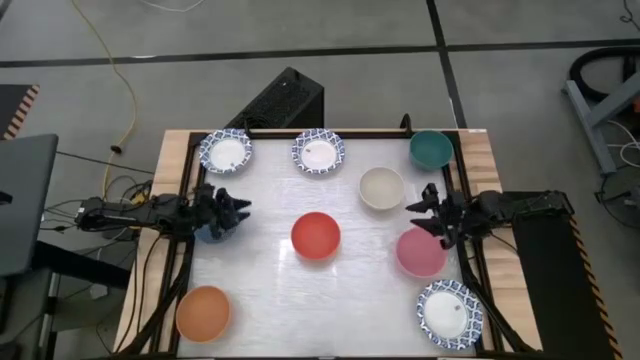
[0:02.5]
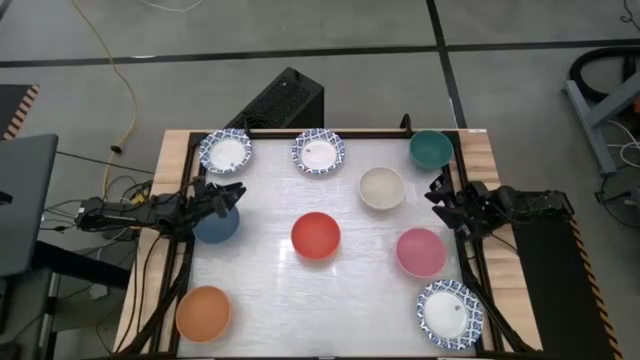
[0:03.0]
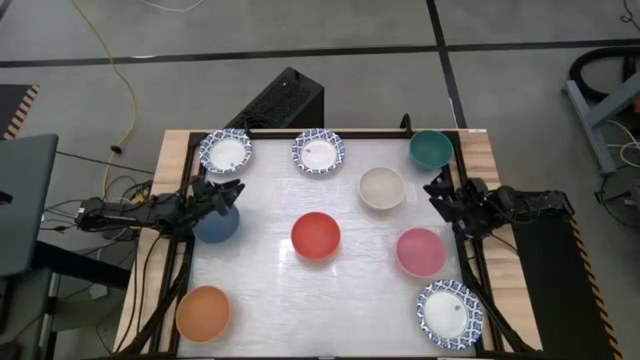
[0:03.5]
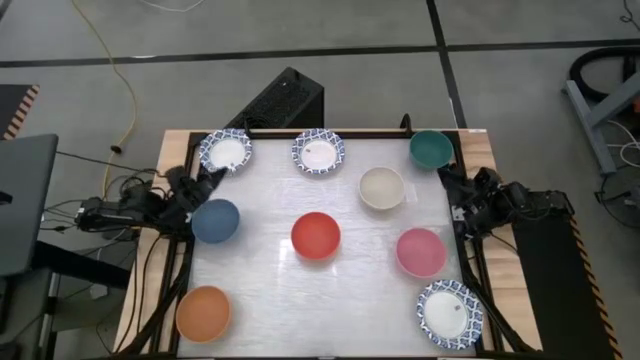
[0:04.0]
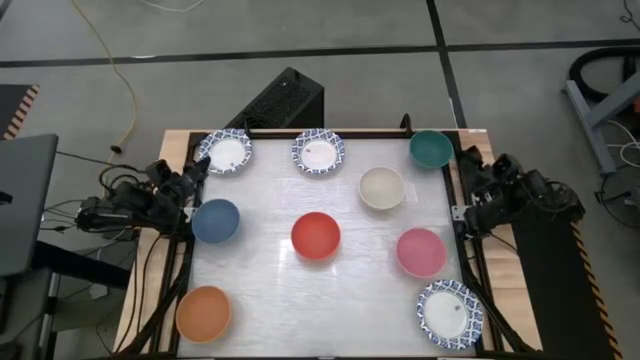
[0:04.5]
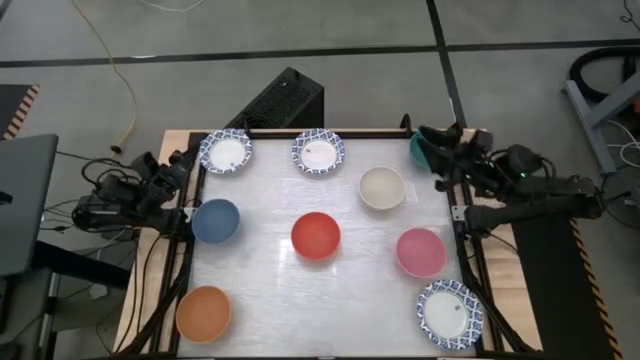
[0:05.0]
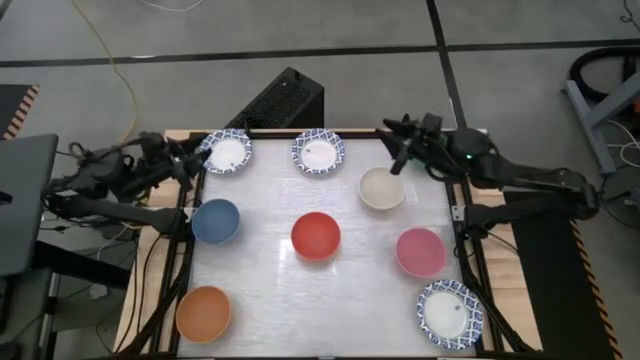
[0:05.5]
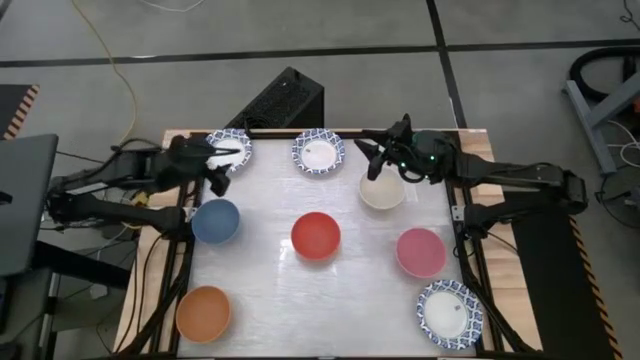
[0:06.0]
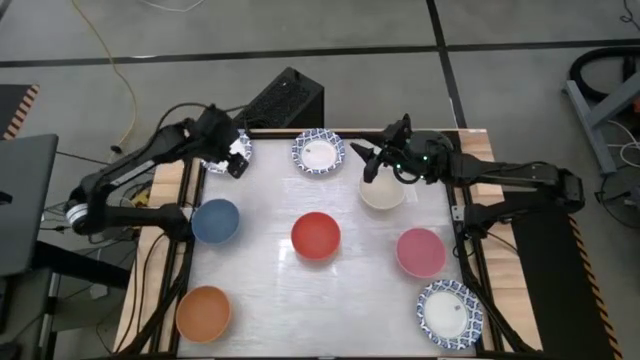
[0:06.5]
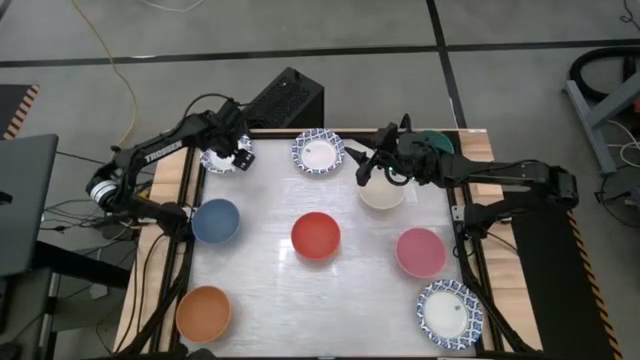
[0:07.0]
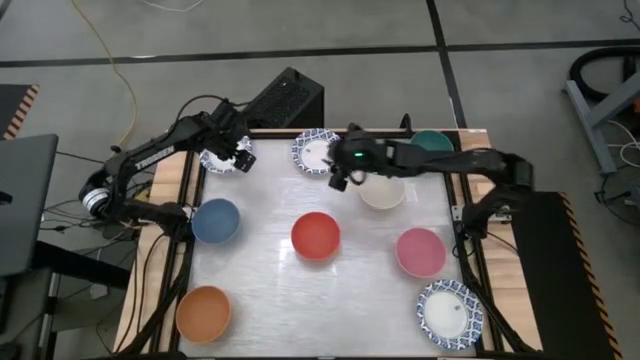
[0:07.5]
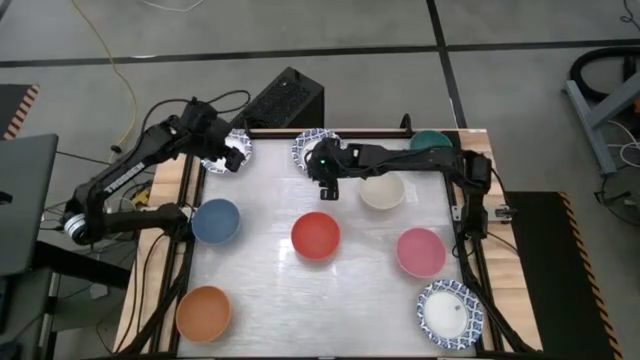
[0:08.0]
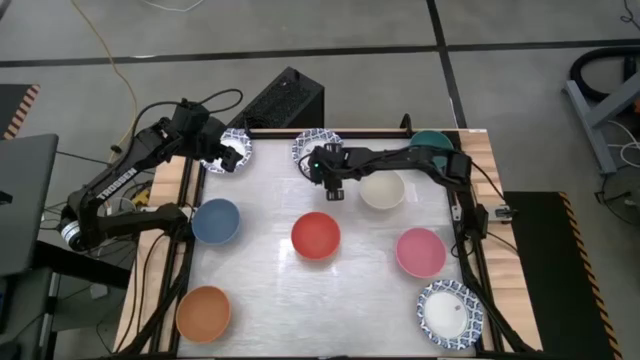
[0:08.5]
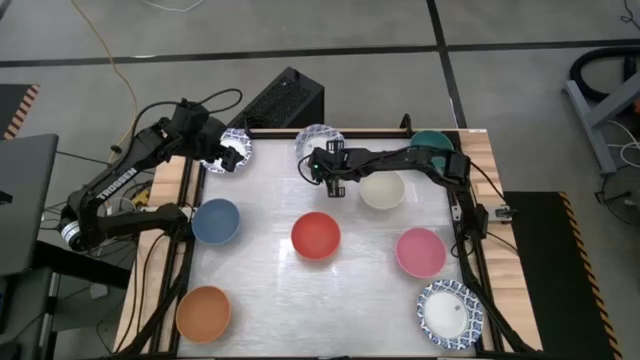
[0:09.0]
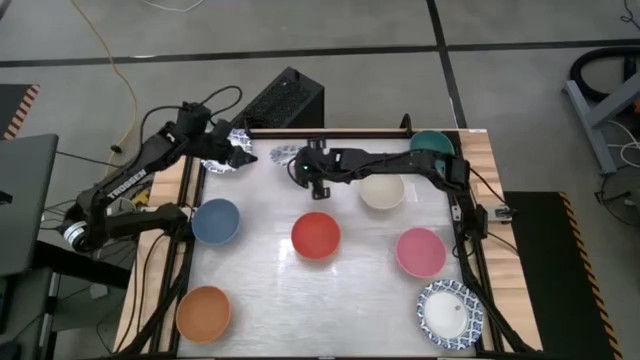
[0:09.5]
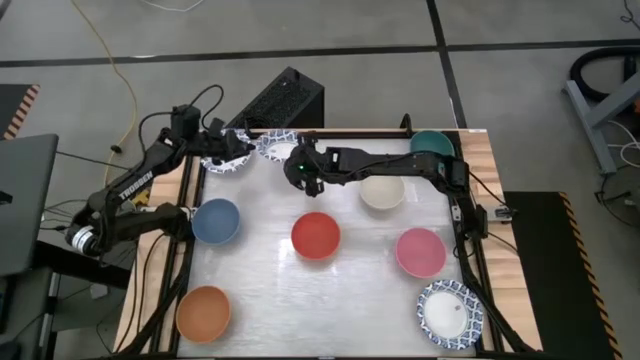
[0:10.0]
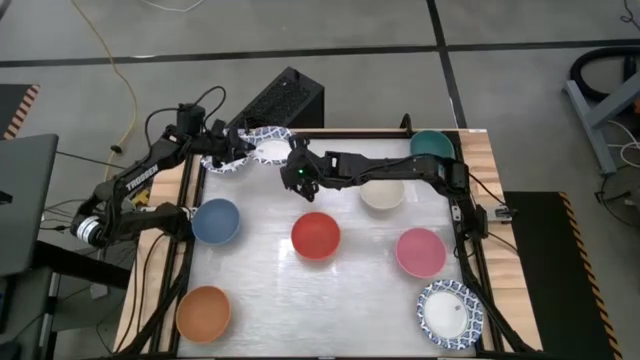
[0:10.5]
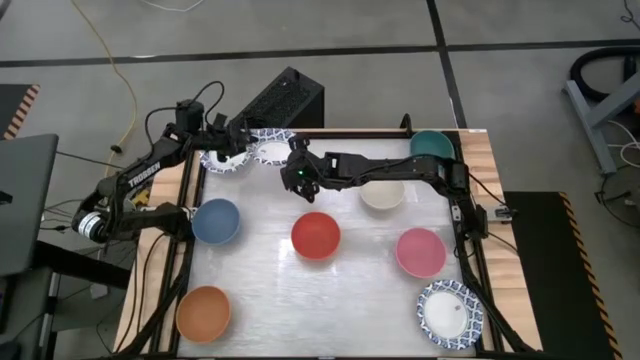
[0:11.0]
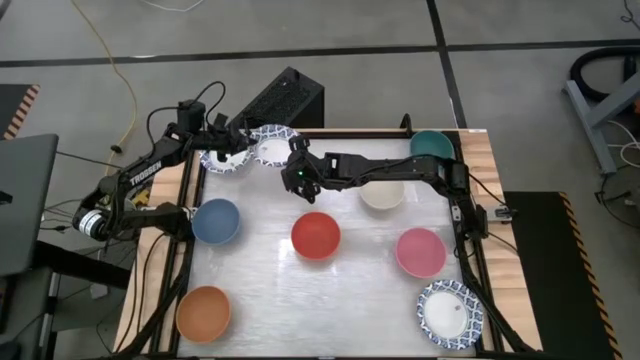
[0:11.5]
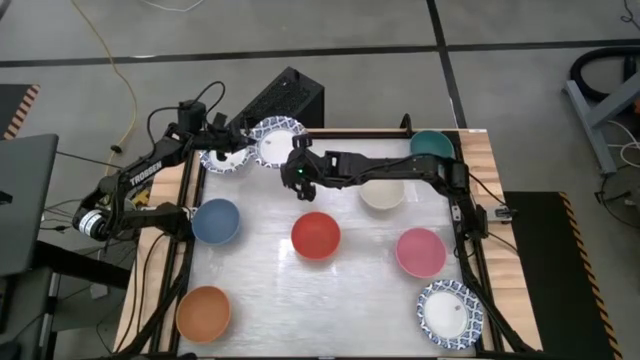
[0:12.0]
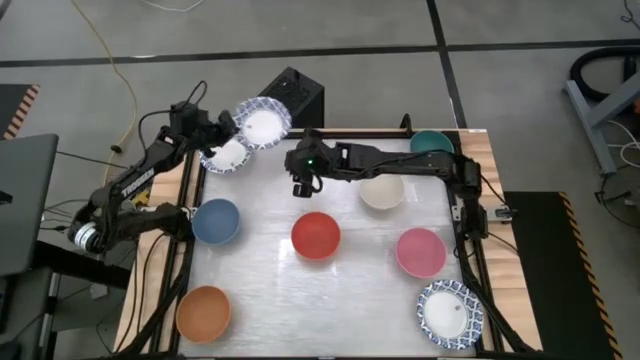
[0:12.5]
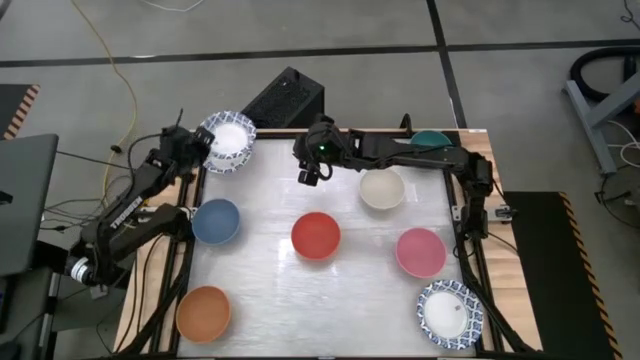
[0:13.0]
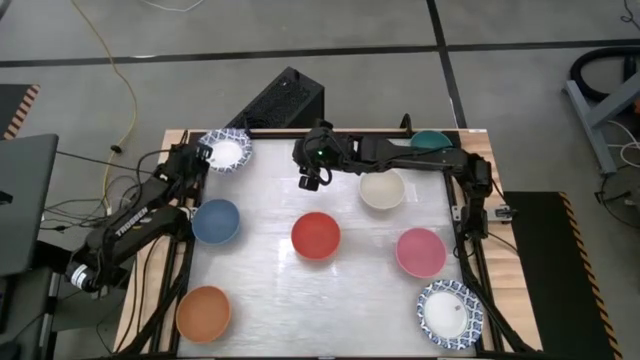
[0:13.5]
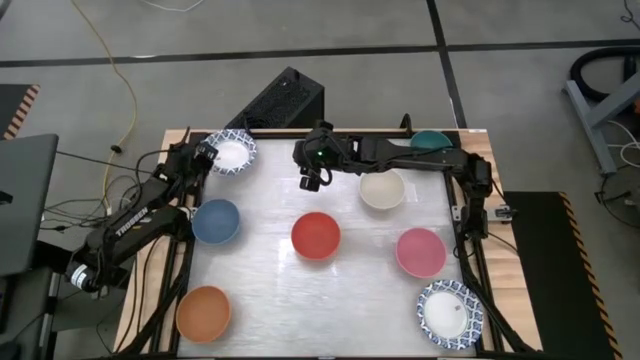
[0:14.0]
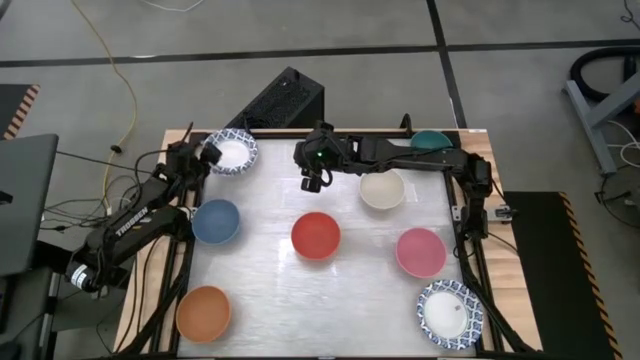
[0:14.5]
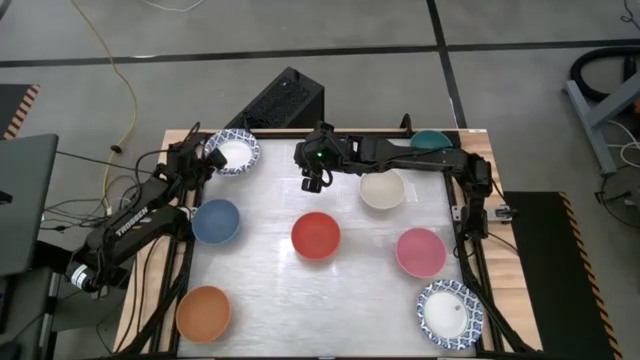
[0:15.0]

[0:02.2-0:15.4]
Stack the top right white patterned bowl on top of the left white patterned bowl

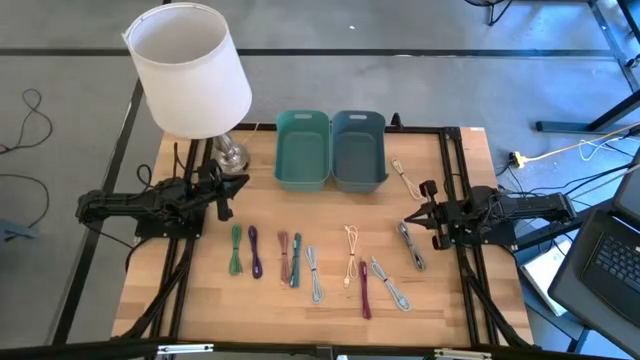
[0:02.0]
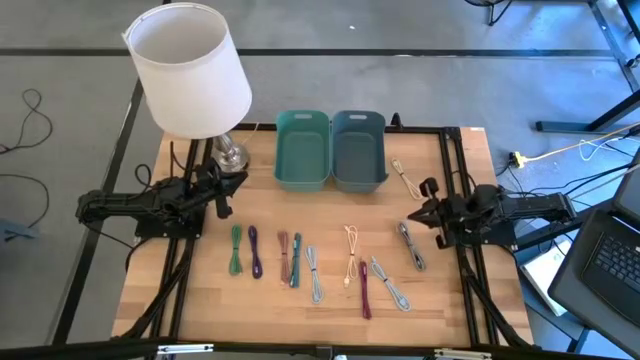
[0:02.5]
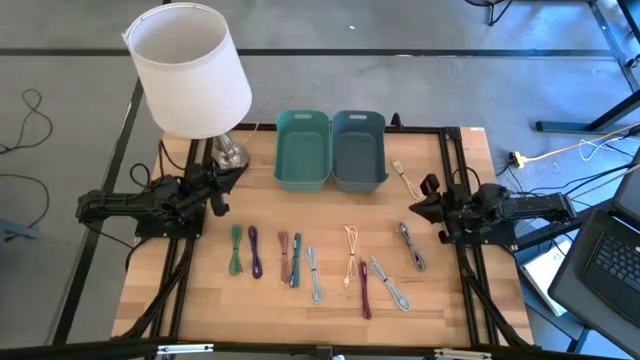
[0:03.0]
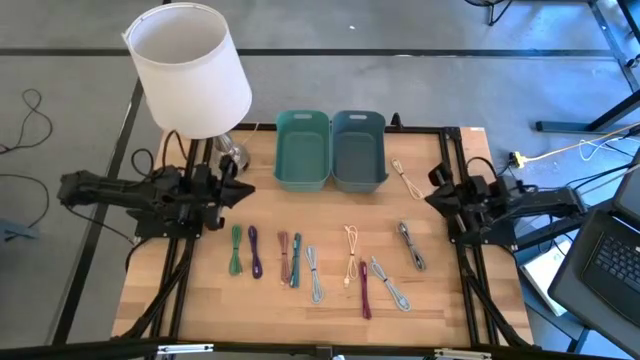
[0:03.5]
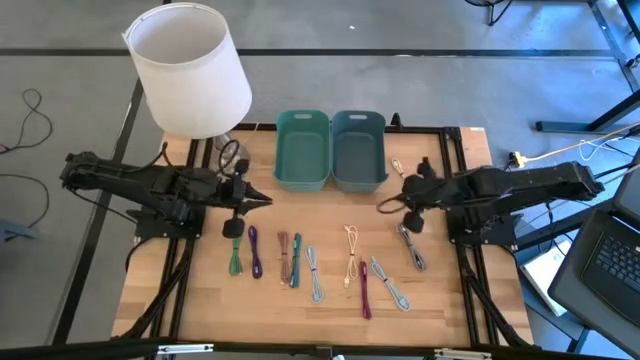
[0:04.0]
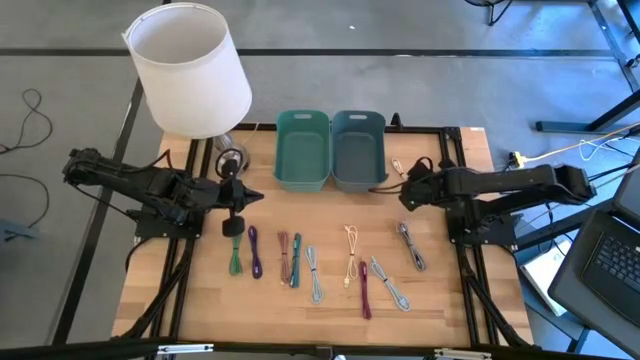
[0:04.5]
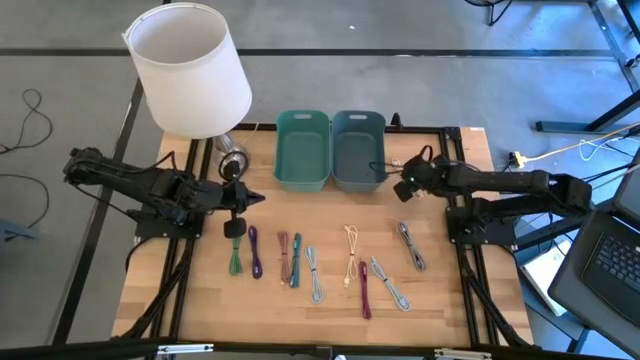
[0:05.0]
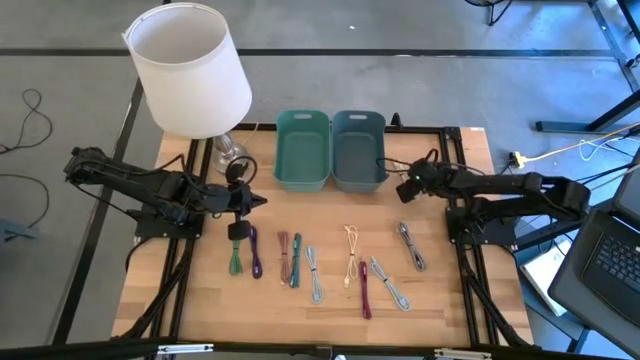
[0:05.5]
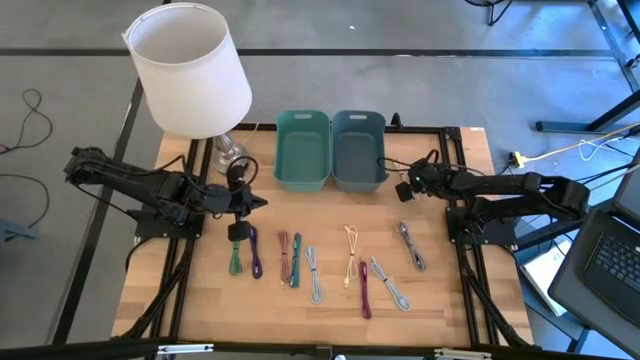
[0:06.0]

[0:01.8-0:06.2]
Put the white charger cable into the blue bin

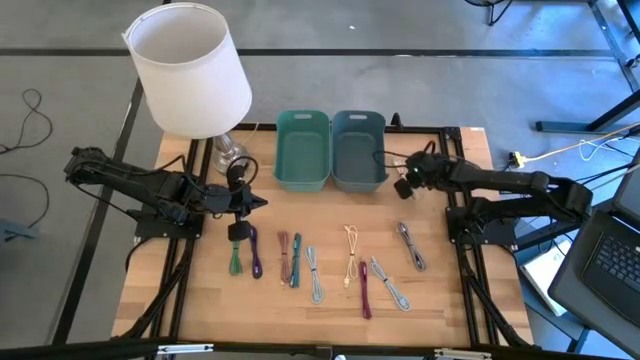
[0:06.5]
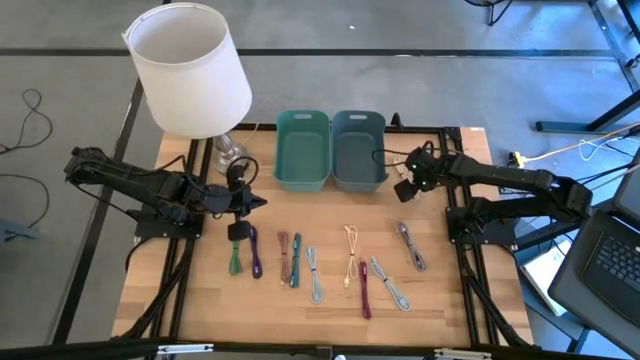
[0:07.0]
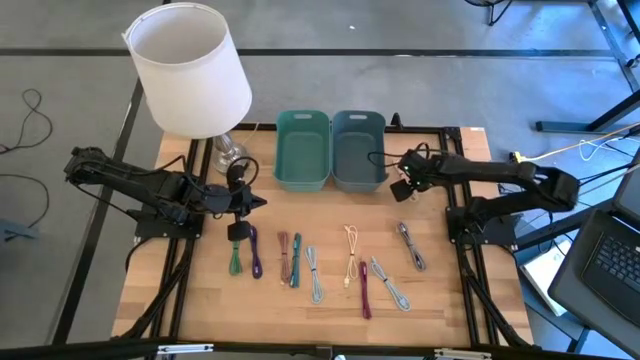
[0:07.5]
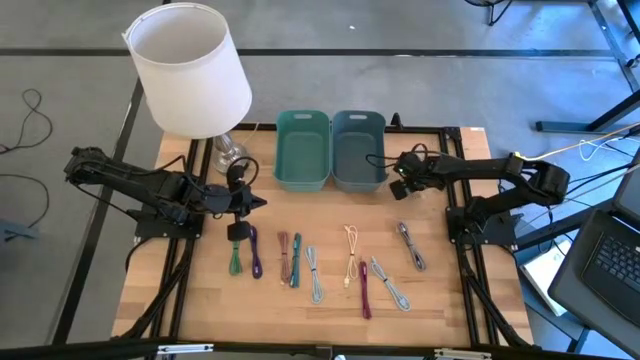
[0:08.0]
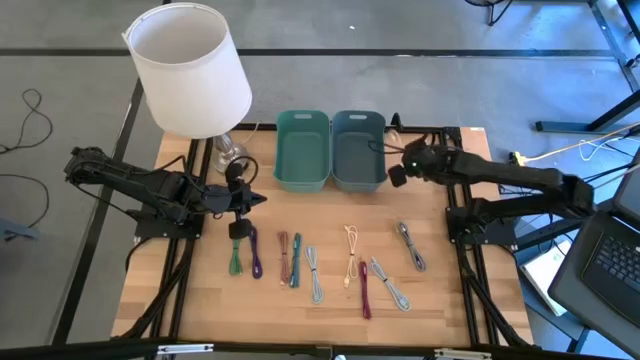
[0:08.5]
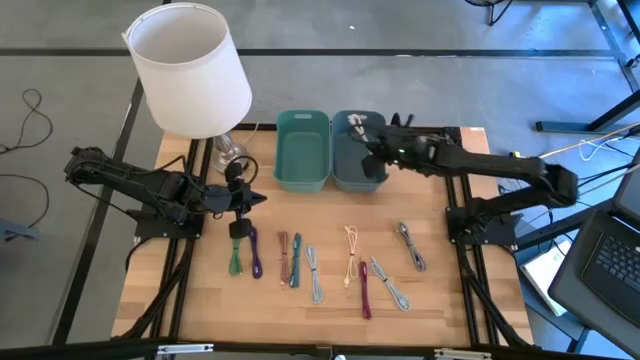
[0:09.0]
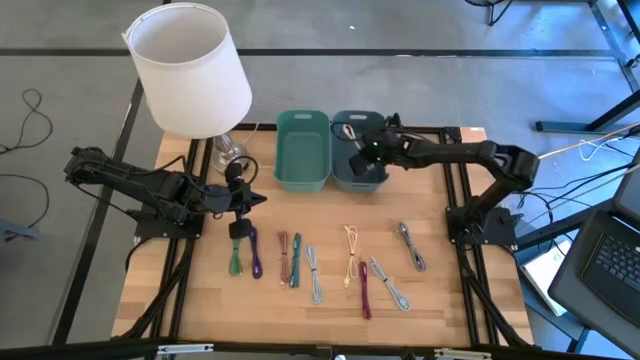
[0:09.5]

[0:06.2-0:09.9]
Put the white charger cable into the blue bin
